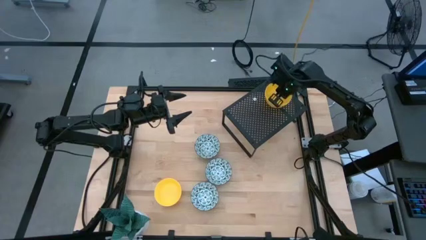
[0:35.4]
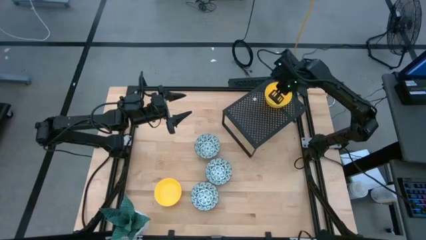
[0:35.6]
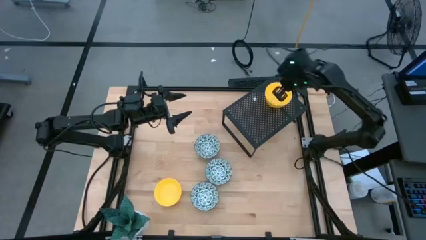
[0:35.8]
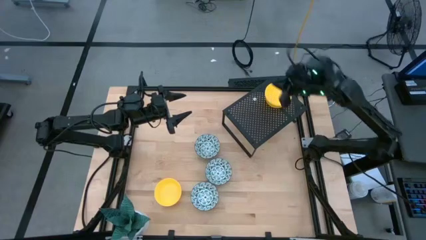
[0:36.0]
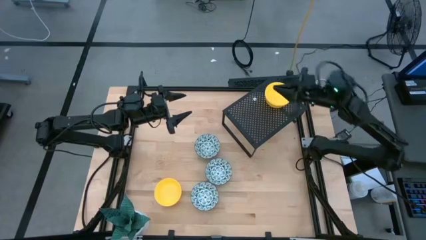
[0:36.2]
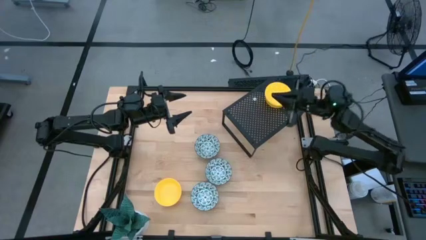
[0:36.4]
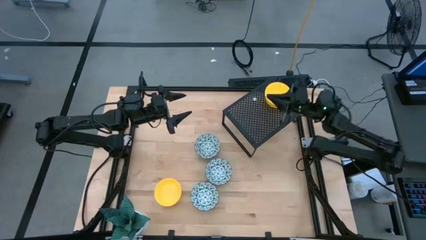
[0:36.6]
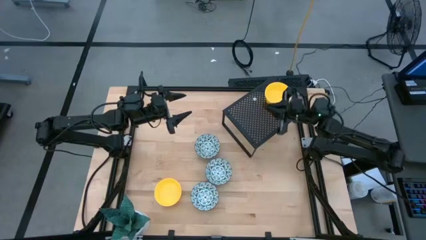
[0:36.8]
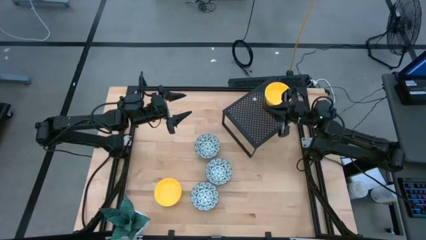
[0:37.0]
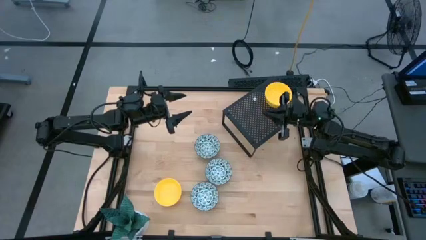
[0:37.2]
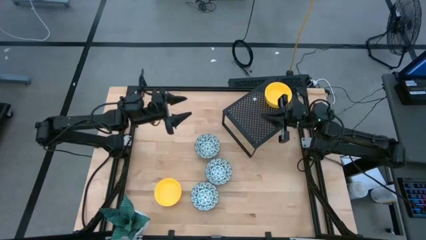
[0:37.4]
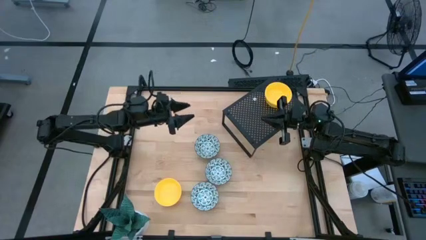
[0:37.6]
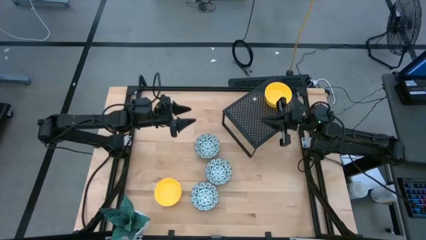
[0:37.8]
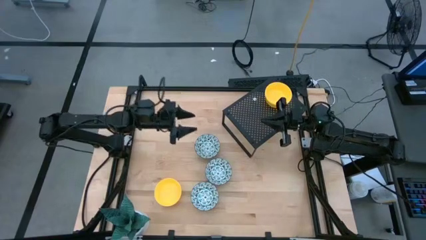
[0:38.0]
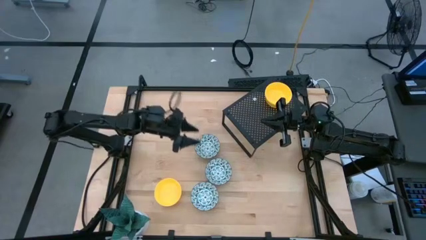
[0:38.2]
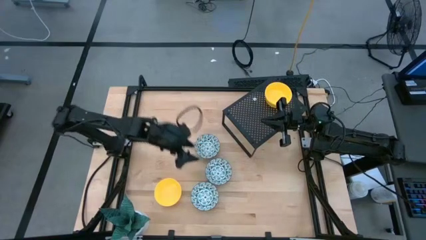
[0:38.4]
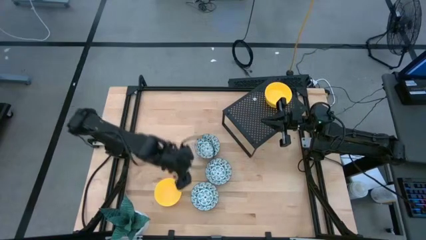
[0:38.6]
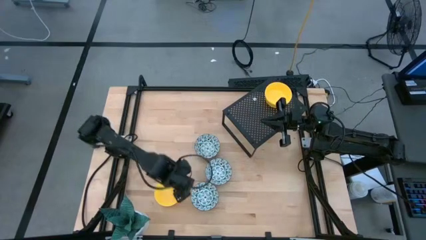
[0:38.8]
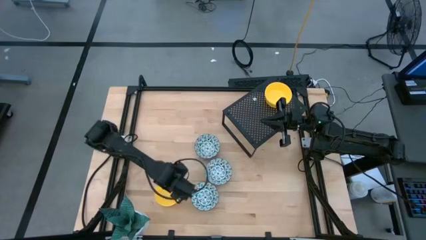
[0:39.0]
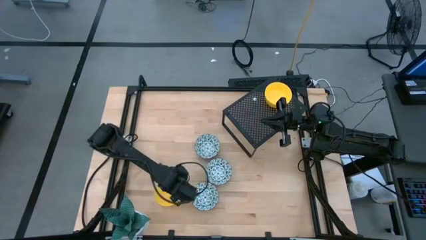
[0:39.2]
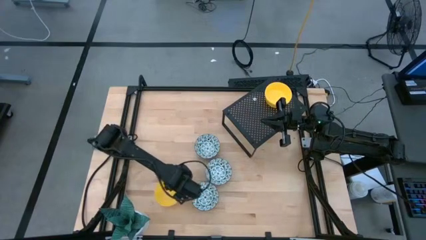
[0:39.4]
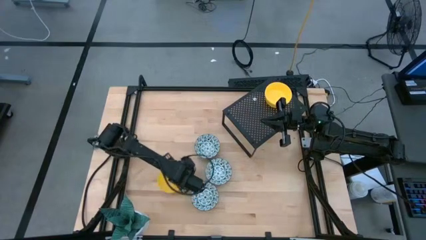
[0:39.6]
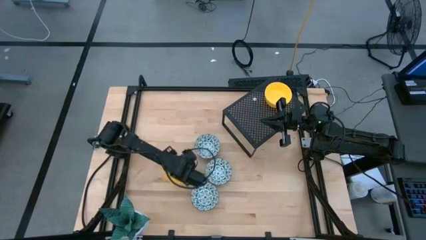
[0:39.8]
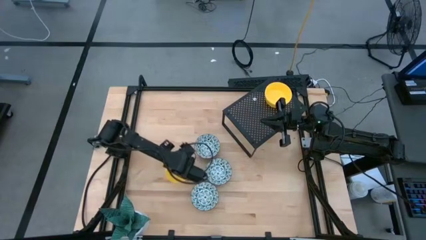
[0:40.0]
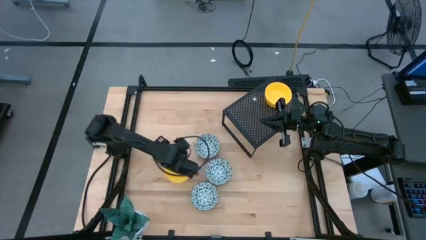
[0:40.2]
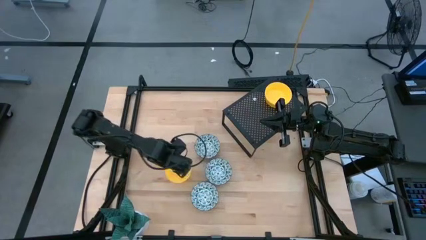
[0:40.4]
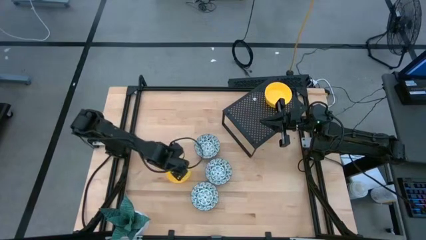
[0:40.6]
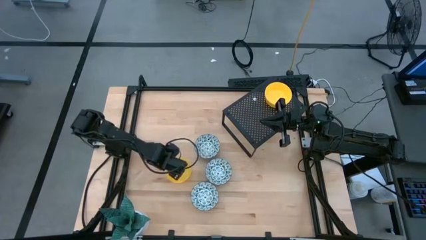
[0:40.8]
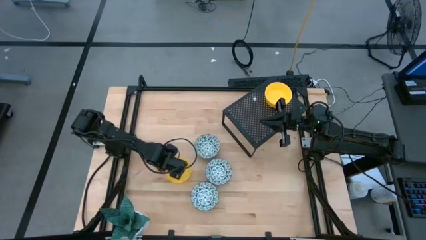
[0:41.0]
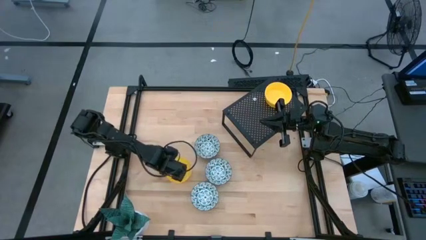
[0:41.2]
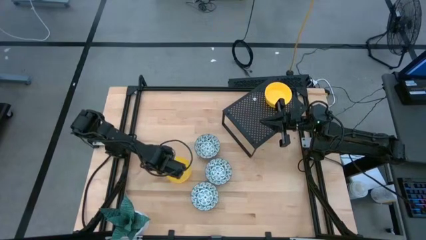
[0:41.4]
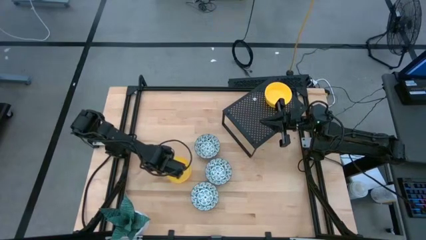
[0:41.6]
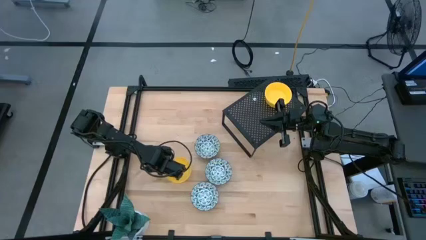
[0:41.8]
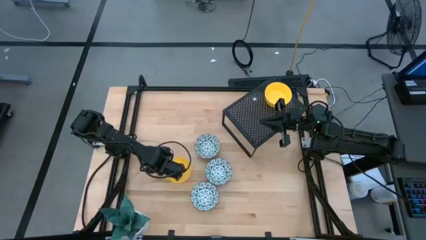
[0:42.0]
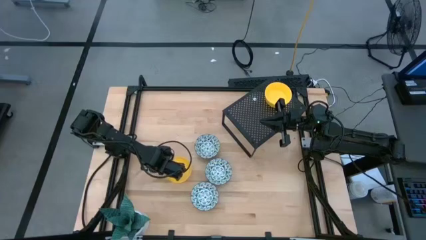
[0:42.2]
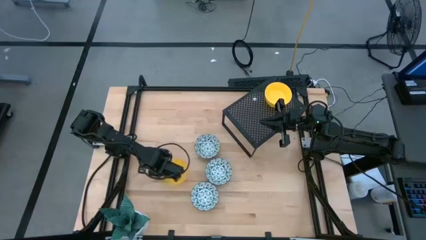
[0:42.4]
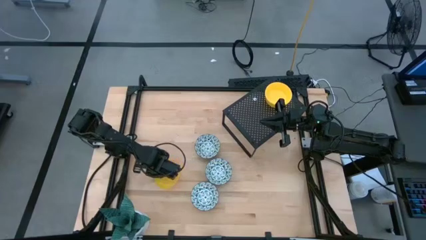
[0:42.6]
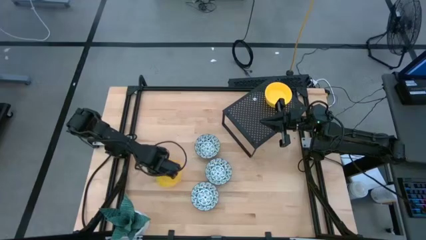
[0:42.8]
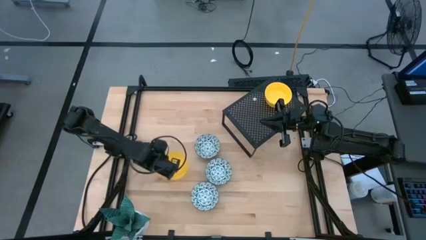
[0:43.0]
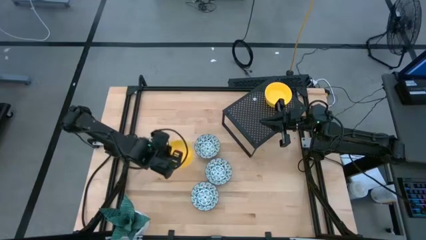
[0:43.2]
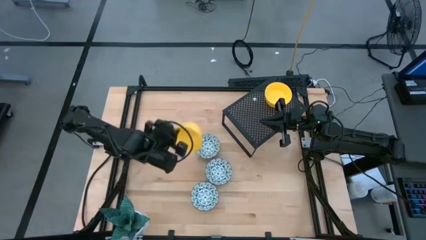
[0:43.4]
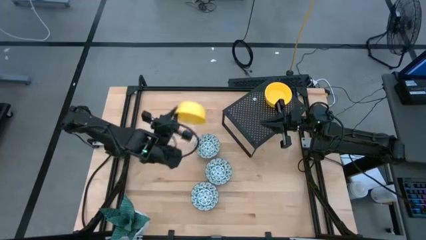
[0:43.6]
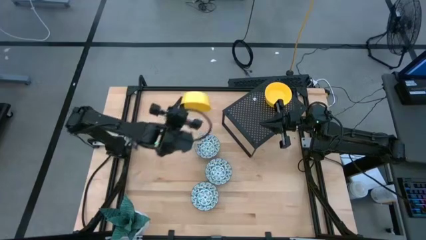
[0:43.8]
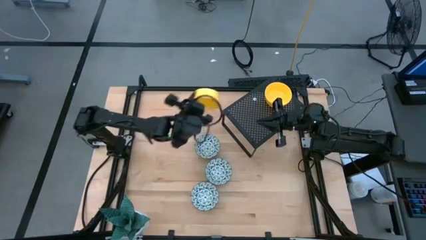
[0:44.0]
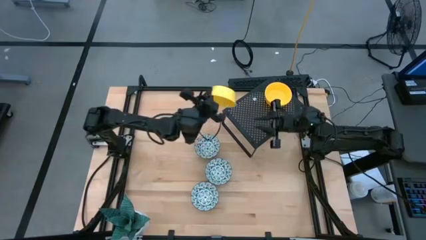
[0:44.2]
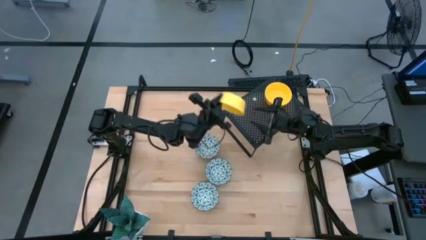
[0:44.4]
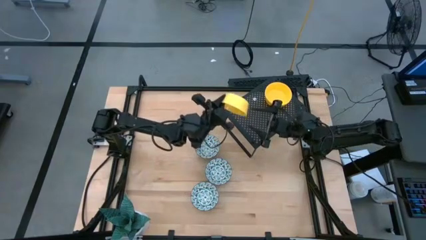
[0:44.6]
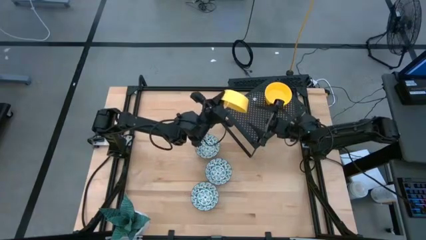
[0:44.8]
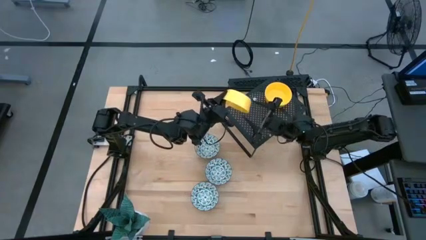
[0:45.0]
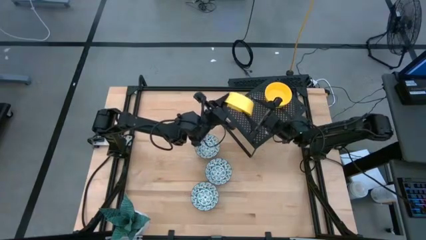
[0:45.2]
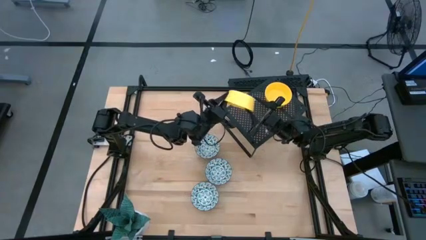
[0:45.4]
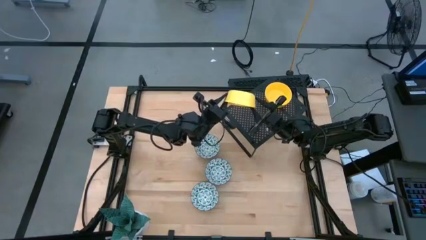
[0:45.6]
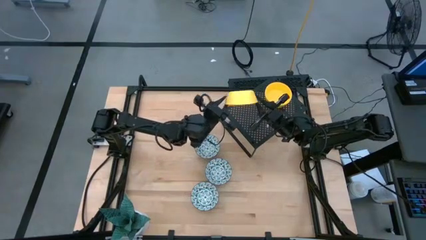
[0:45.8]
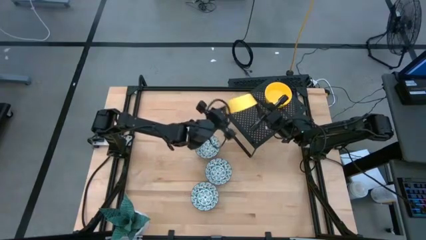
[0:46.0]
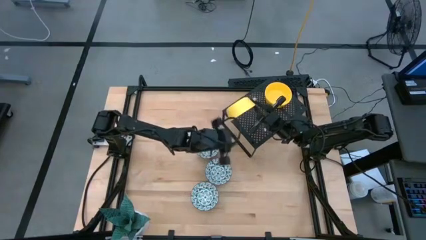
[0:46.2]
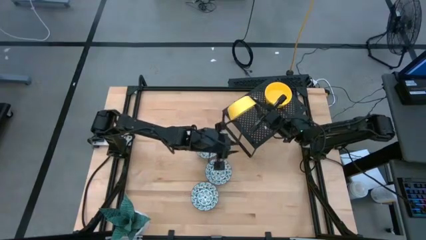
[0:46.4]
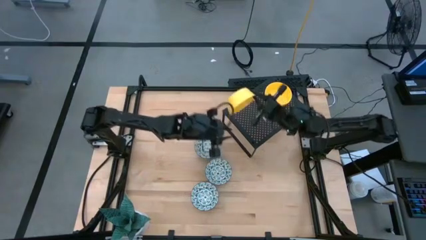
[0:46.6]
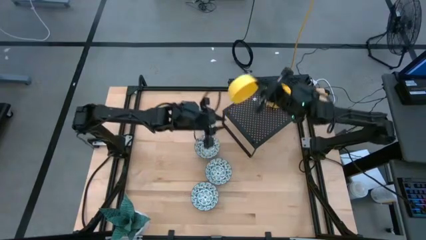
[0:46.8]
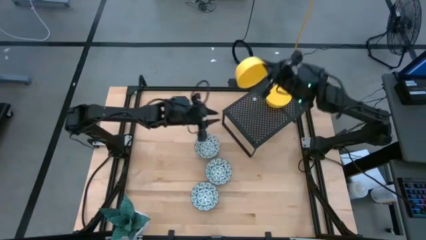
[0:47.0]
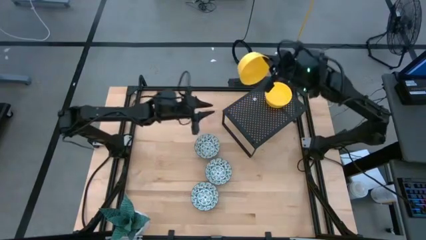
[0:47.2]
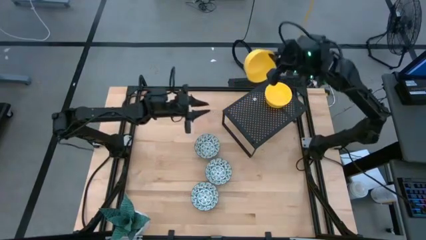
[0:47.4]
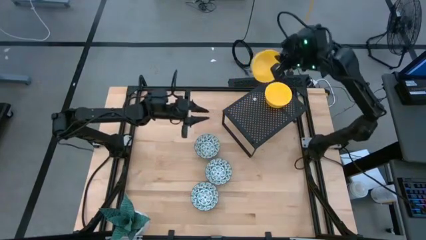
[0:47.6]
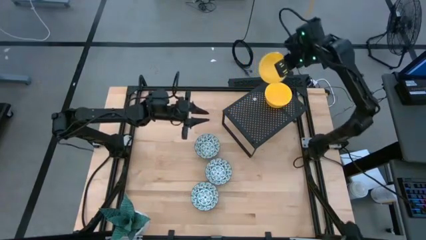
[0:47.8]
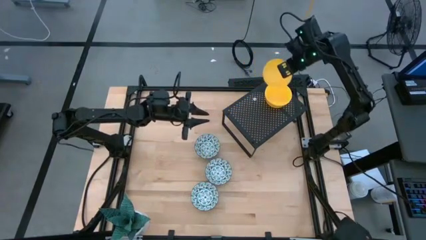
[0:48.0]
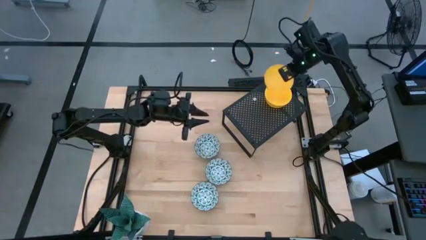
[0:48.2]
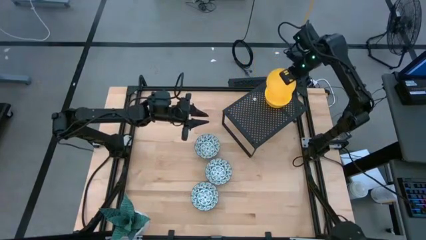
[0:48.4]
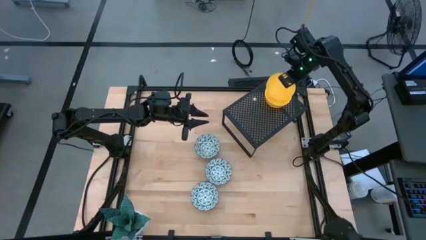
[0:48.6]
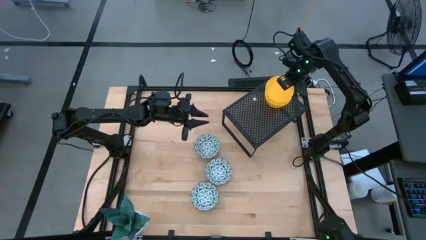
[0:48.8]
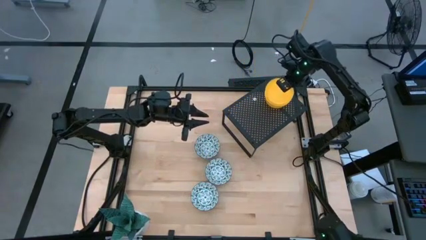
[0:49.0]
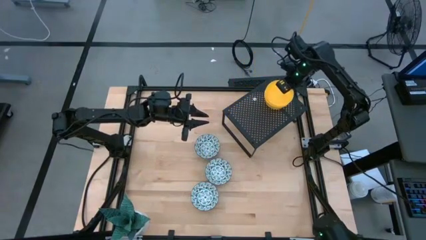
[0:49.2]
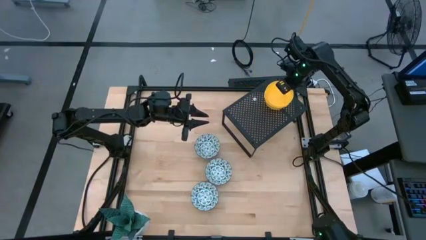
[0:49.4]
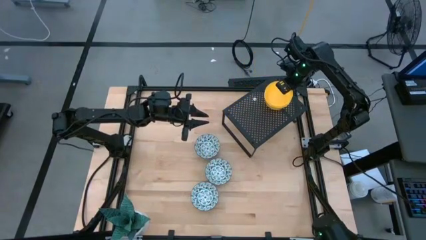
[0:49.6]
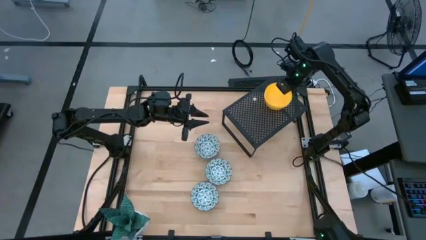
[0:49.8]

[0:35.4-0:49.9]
Task: Pick & Place Mini bowls
Stack the yellow bowl on the yellow bowls on the shelf

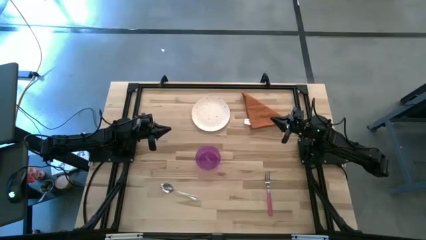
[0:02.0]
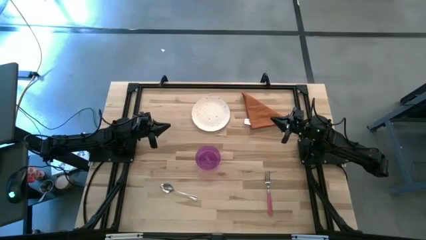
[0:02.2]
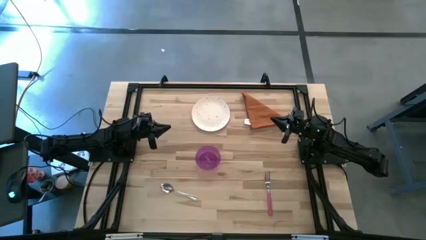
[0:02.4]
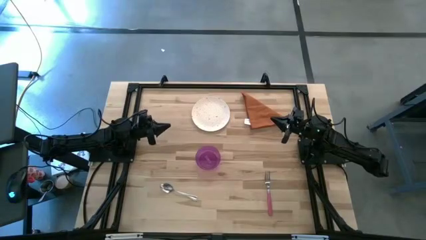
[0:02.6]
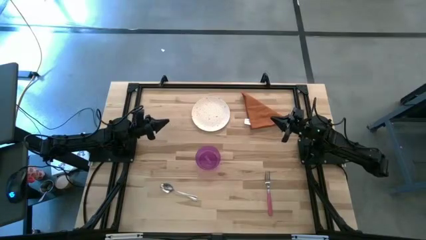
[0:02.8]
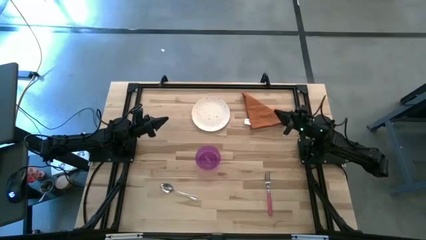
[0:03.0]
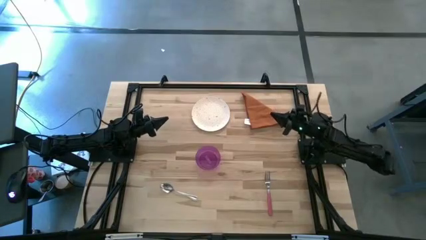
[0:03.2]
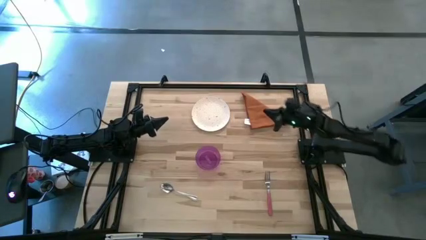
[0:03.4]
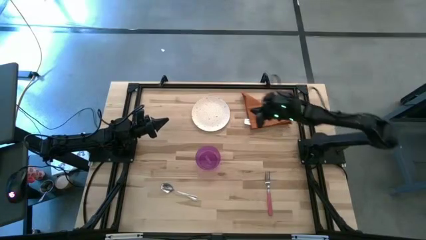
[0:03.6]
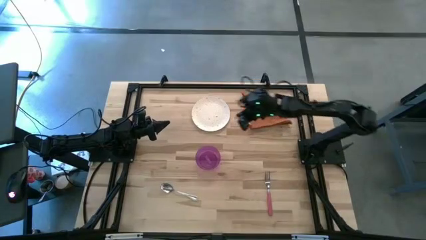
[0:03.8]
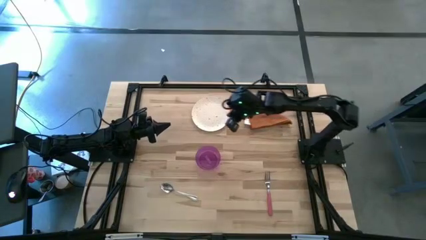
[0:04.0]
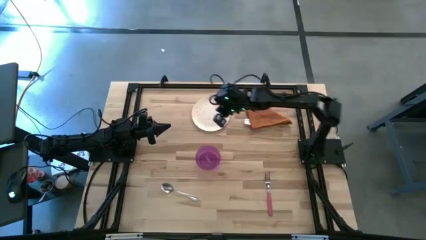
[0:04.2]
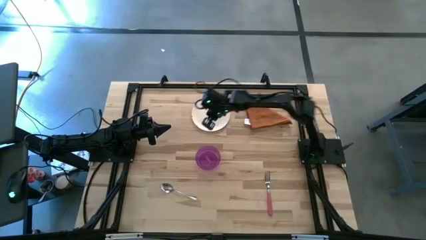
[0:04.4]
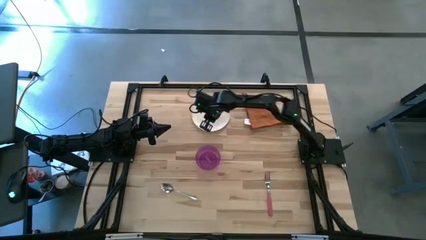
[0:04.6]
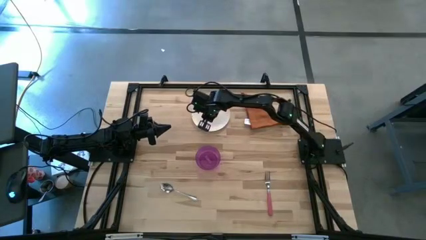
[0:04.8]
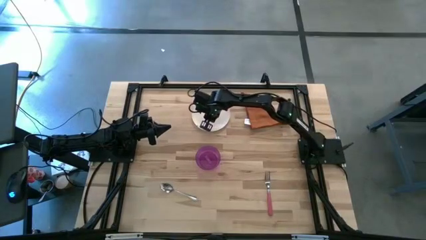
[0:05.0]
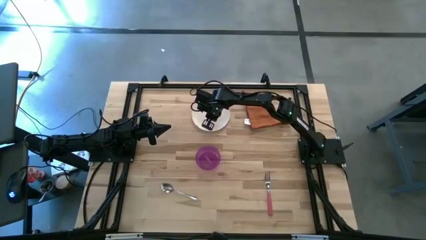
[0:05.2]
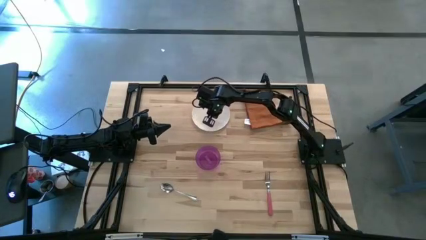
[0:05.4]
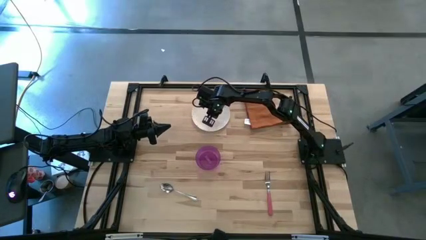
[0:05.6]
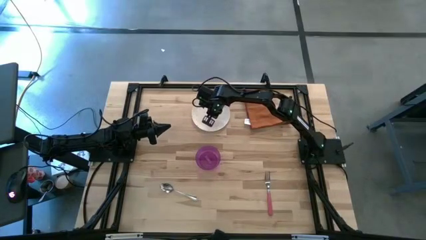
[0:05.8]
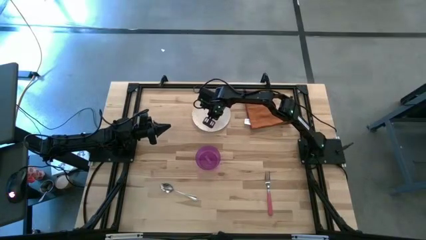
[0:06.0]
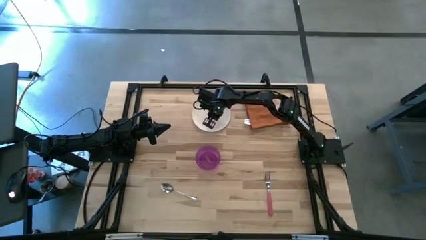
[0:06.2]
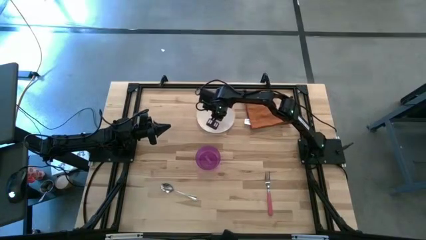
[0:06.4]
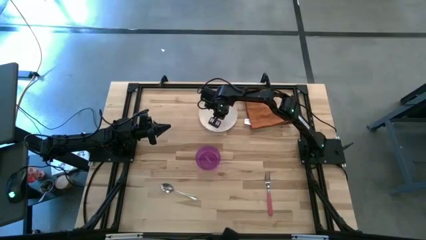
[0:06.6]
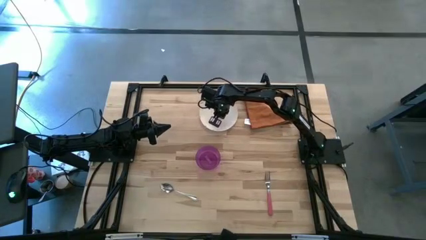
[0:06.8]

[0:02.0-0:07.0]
Task: Set table place
Prepare the white plate
